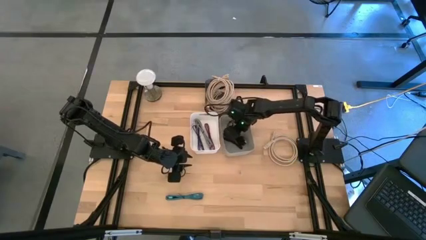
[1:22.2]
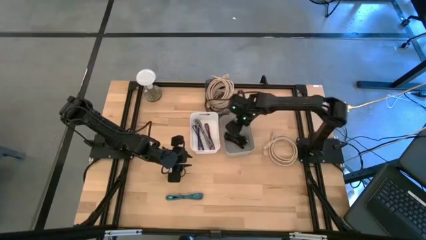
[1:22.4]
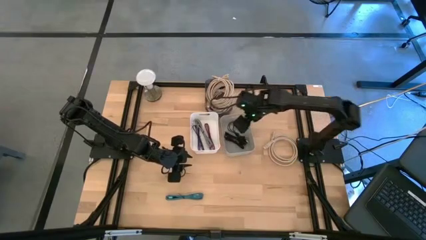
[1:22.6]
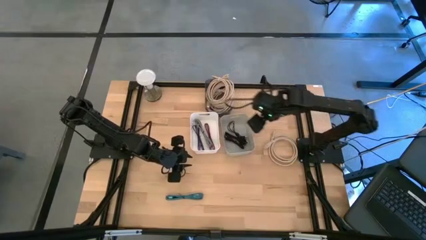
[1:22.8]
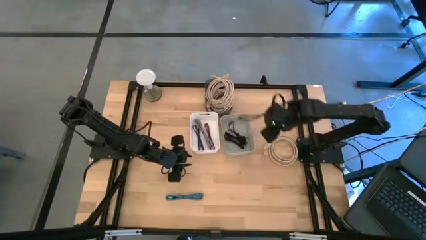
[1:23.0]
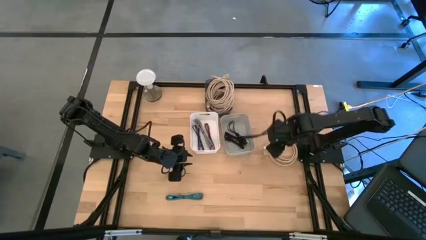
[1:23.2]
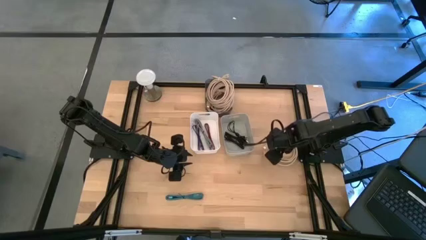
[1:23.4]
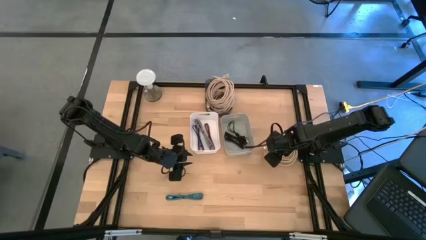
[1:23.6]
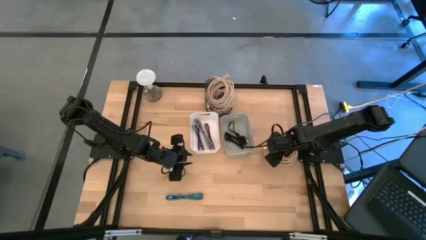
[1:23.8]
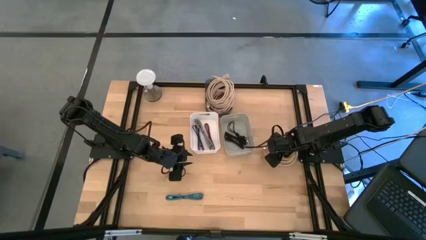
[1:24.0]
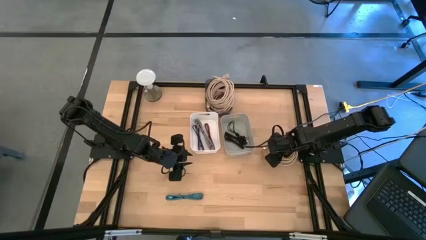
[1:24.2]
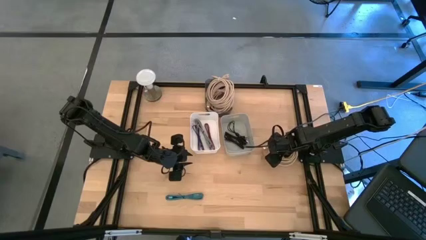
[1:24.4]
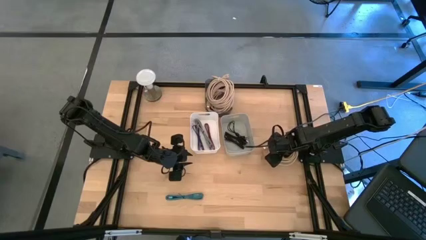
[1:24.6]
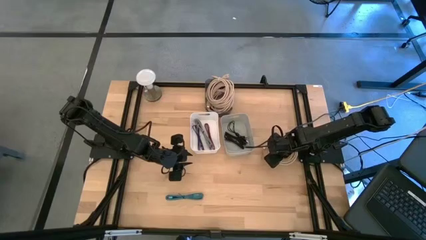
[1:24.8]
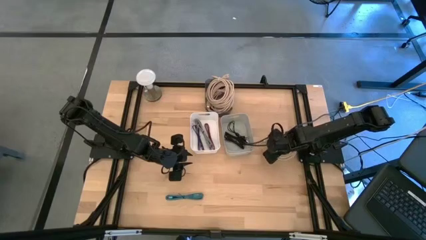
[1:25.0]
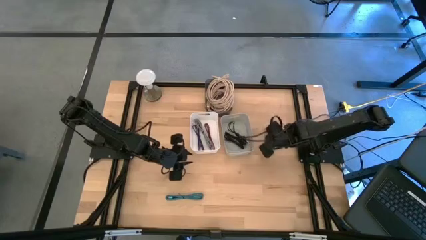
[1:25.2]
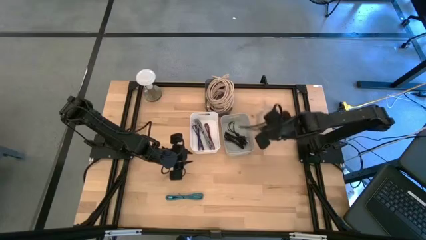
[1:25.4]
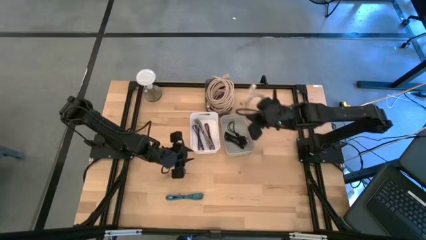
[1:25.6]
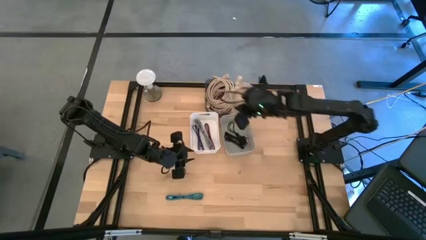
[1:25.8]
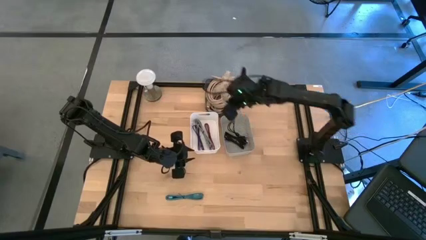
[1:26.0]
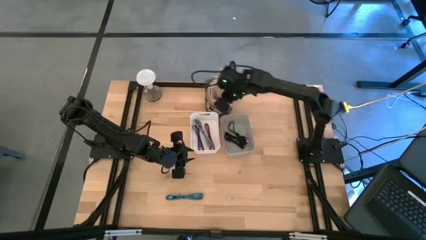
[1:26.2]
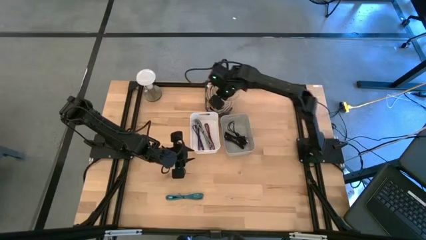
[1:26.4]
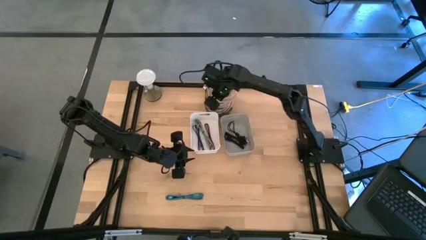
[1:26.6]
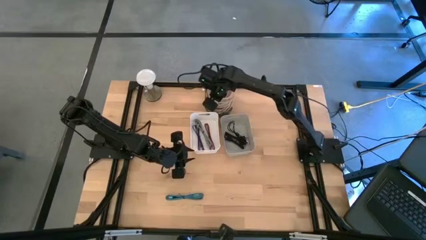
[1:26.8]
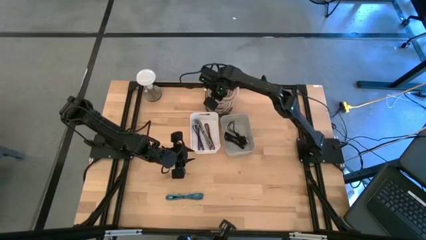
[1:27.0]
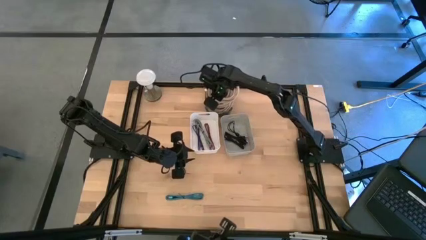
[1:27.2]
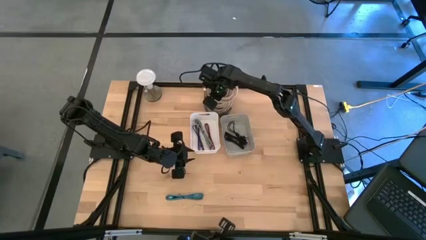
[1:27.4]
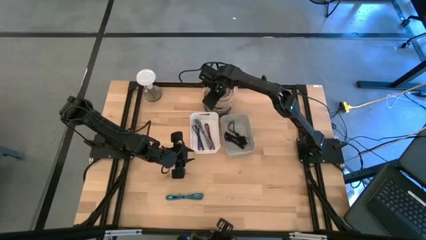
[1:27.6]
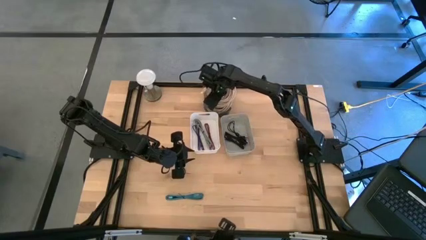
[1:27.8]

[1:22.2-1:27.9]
Task: Pick & Place USB Port
Put the brown HDMI cable into the black bin

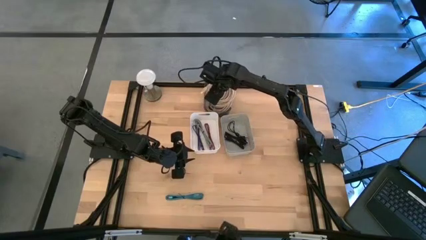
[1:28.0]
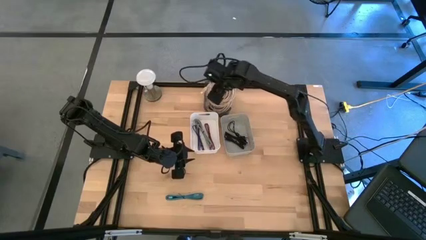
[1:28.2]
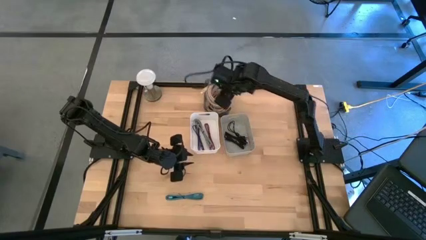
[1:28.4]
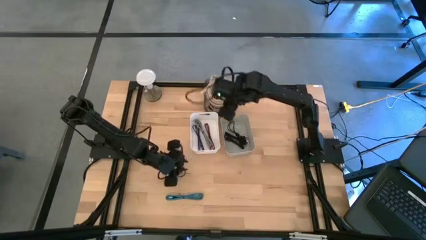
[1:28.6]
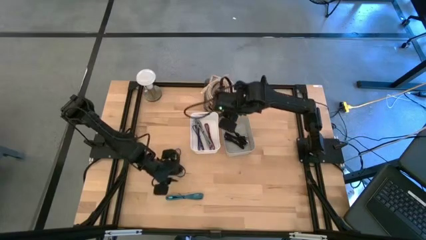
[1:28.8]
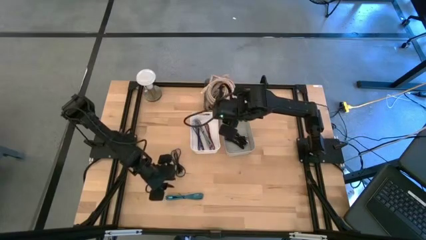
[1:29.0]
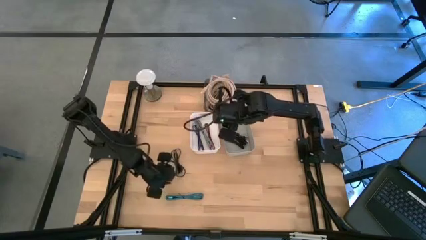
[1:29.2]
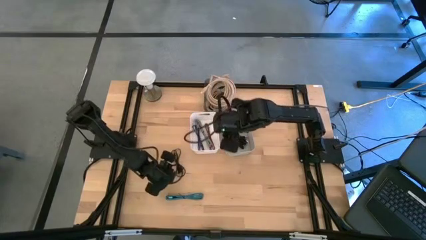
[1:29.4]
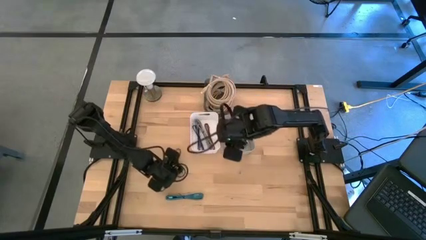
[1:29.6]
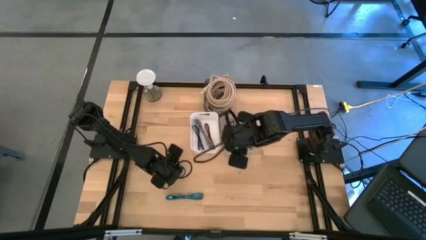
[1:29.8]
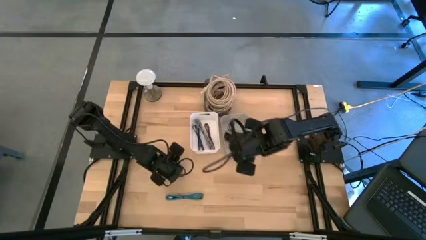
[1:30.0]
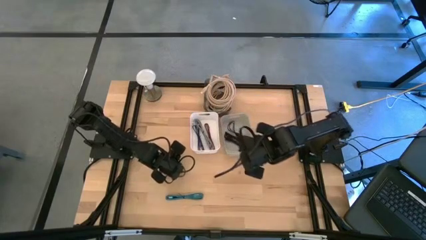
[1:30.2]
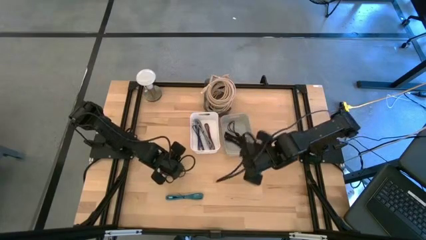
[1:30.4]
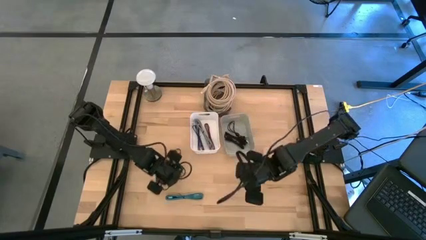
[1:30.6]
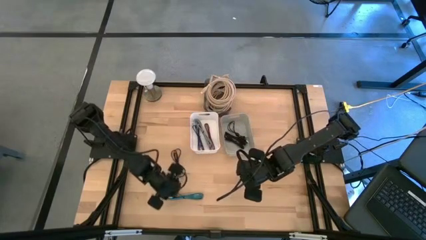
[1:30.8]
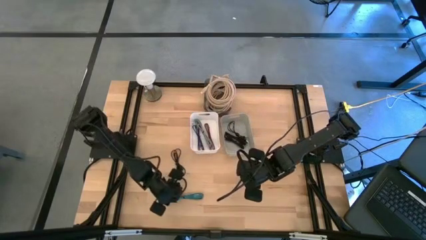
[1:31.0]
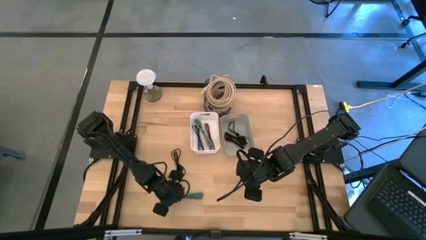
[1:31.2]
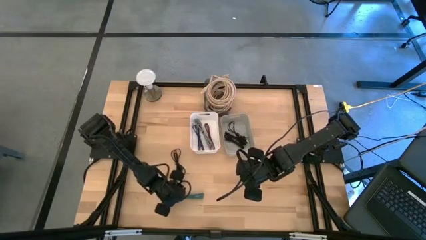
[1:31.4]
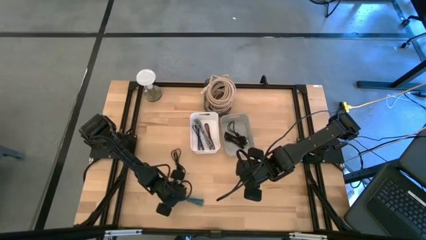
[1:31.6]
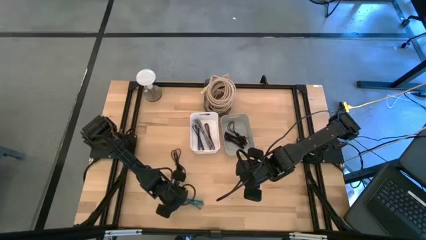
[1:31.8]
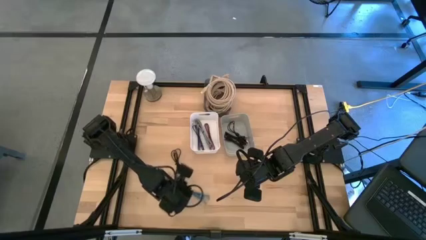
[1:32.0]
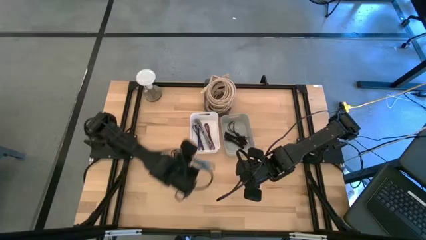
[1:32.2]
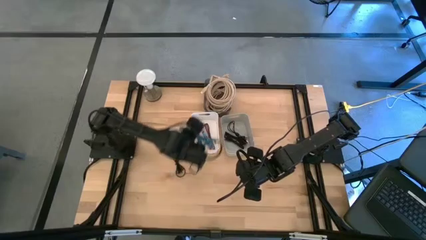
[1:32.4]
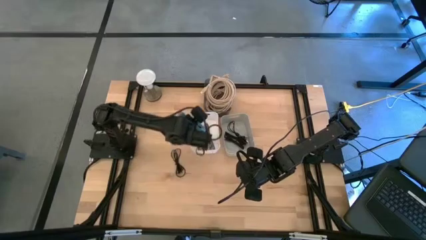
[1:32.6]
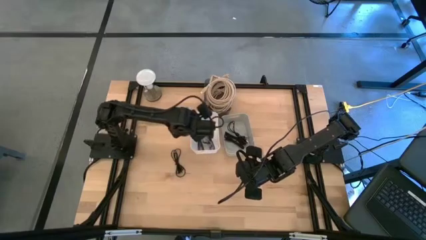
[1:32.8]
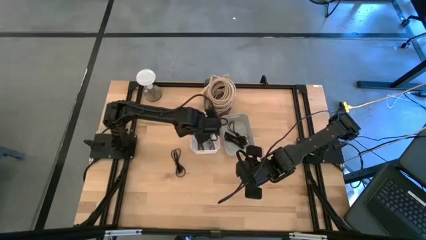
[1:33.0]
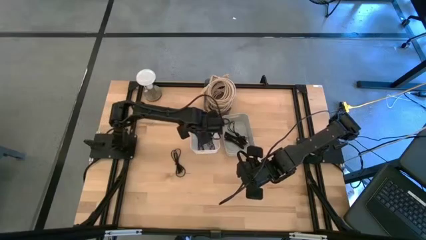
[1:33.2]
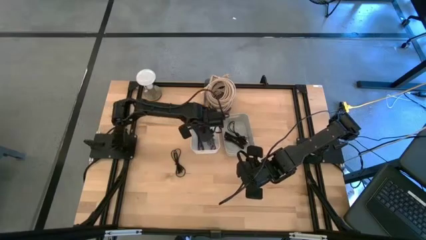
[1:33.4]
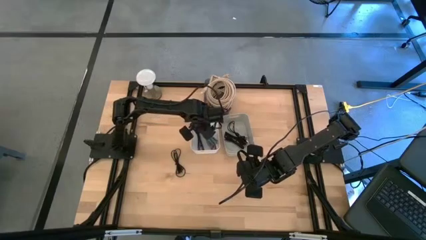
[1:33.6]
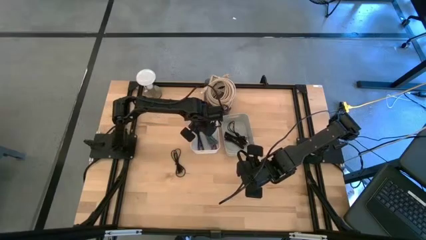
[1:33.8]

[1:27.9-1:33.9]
Put the blue patterned charger cable into the white bin

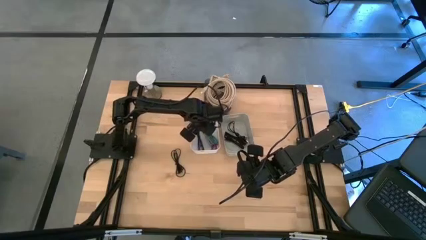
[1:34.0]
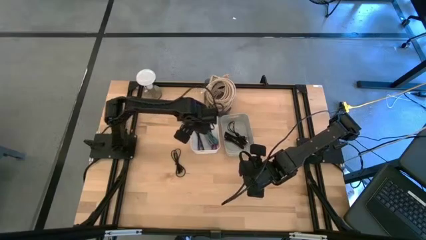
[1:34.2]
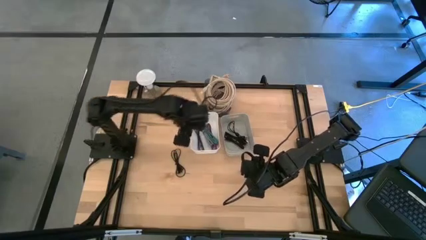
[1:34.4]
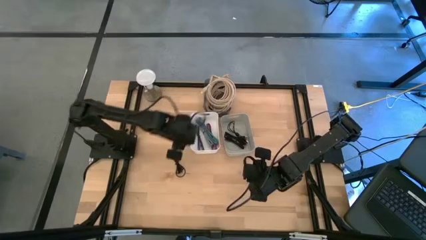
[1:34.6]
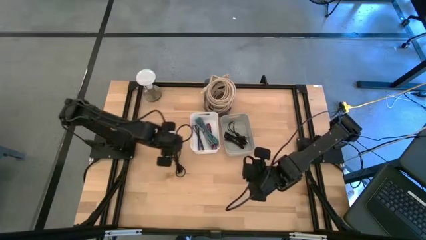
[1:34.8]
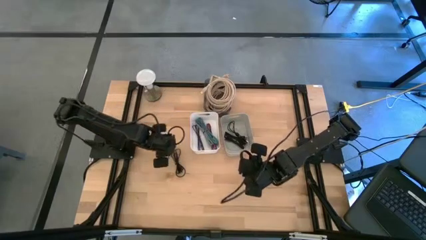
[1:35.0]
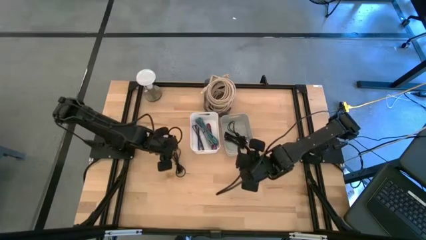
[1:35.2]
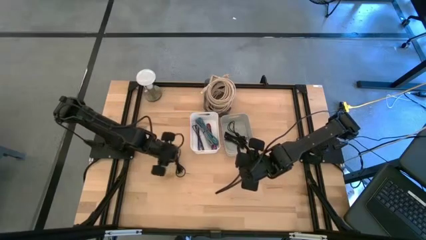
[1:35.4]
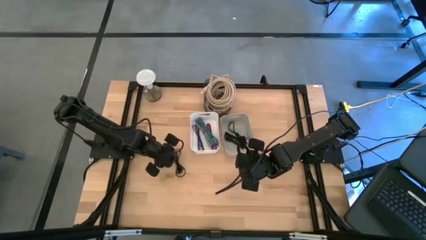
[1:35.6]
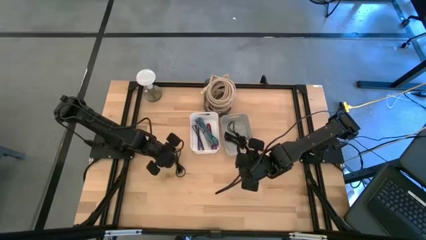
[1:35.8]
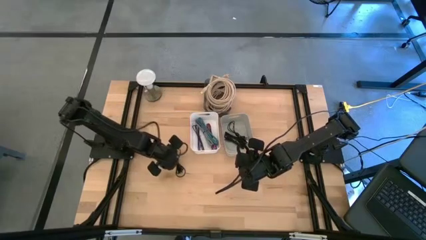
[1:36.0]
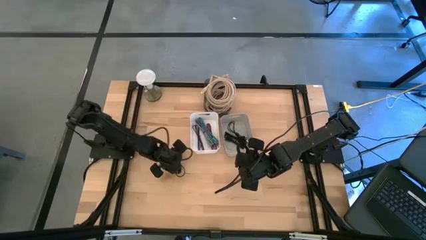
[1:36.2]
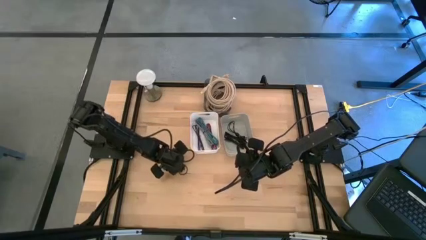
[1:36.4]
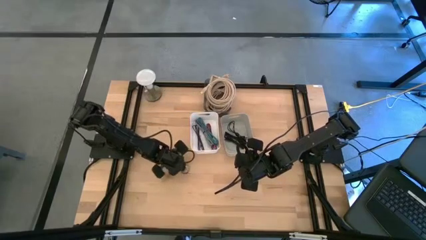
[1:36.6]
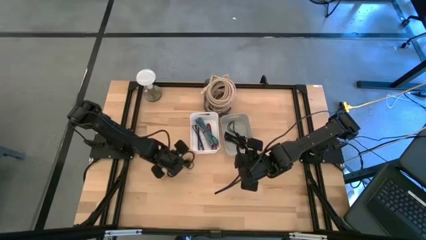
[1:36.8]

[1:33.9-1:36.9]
Put the black charger cable into the gray bin

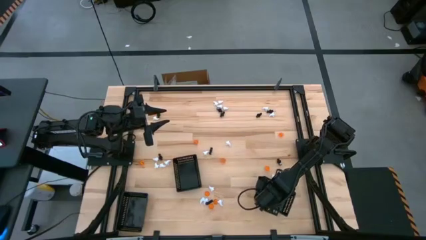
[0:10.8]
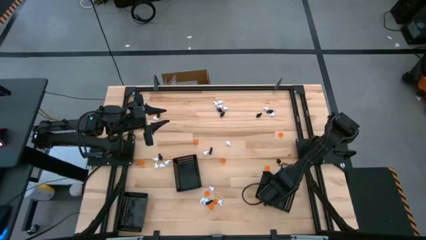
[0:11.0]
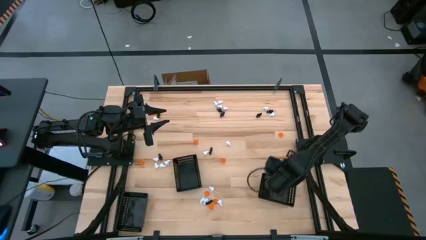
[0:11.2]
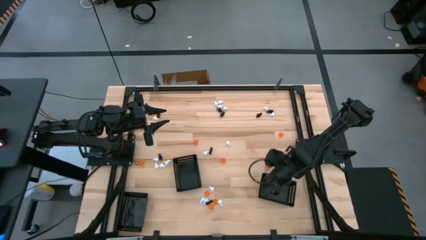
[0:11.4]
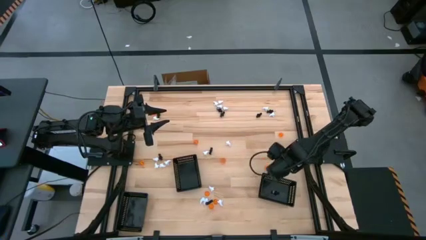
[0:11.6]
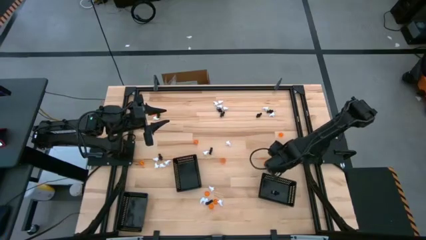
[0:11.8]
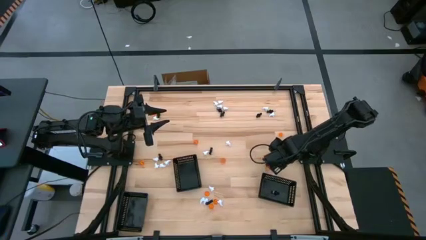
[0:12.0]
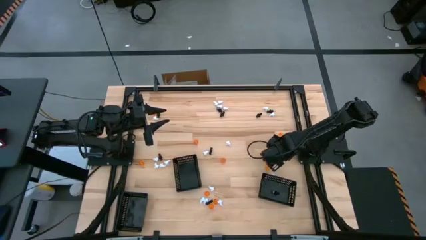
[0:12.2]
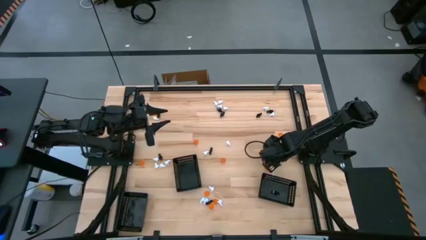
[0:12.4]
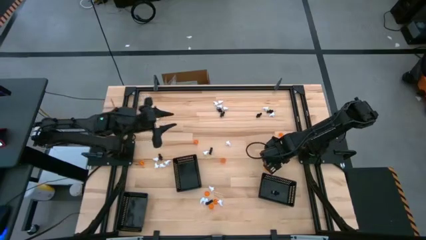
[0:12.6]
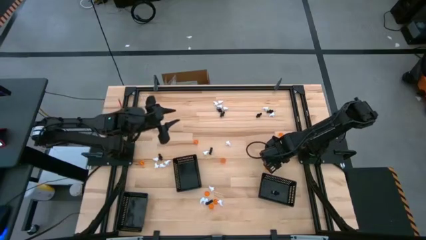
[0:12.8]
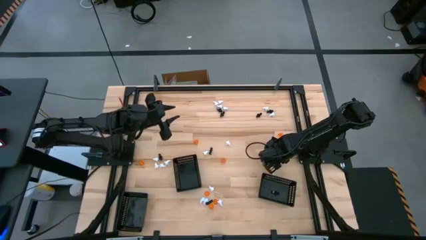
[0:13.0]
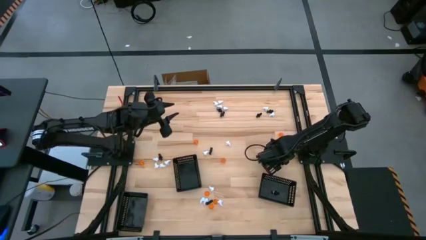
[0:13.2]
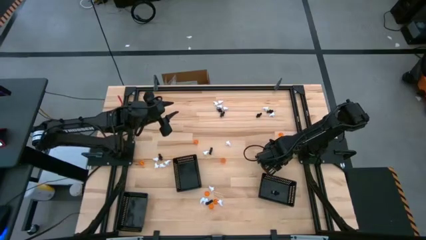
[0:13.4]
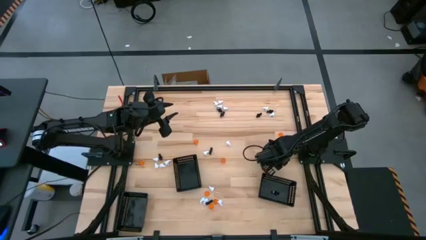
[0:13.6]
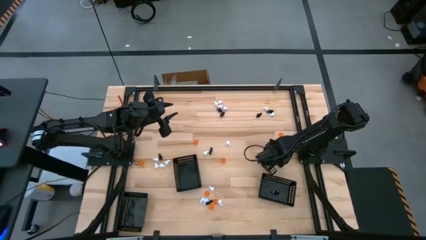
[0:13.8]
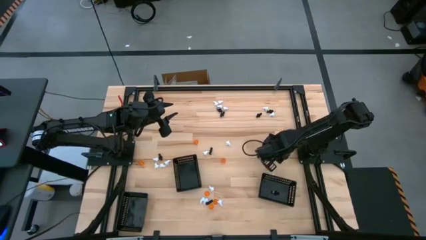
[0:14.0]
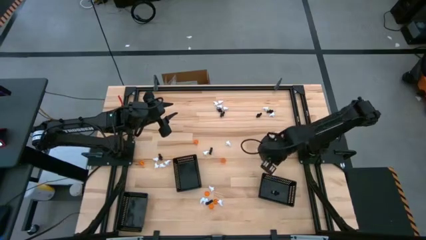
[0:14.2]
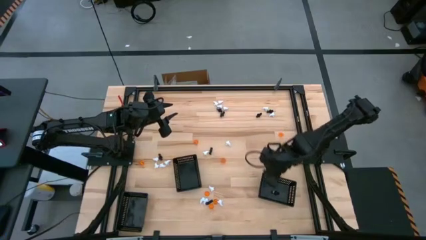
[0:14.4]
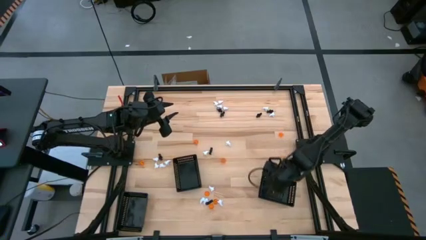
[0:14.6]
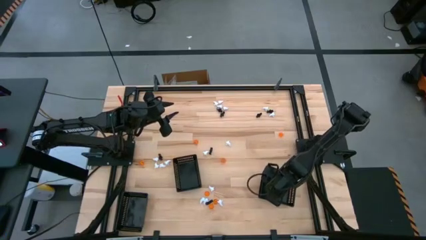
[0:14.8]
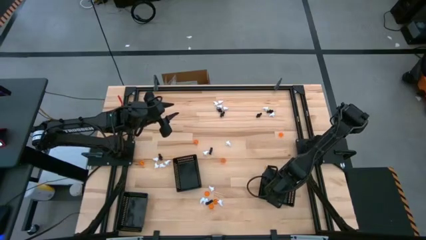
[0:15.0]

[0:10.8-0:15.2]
Task: Sort Halloween decoration
Put the black skeleton toy into the right black basket
